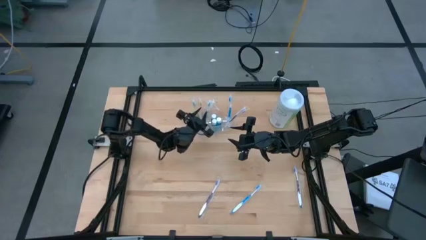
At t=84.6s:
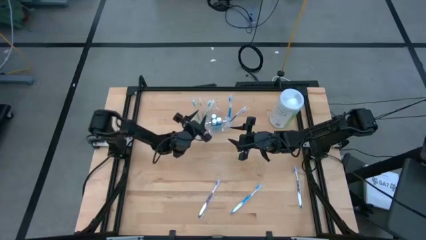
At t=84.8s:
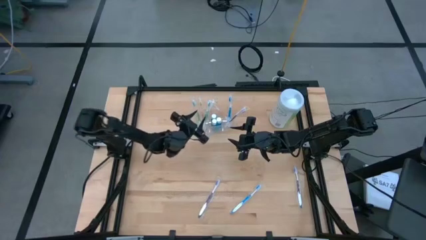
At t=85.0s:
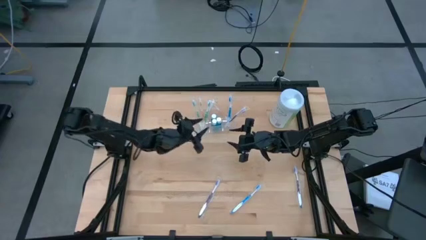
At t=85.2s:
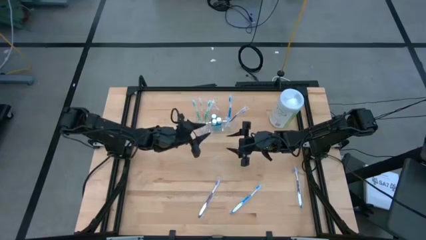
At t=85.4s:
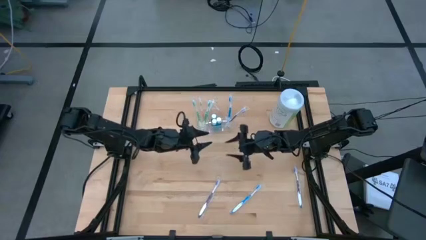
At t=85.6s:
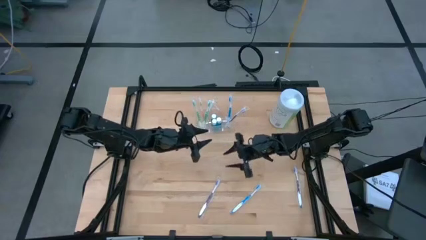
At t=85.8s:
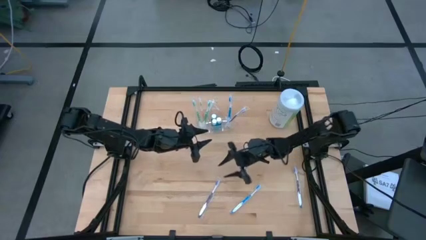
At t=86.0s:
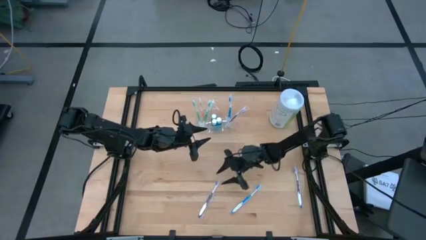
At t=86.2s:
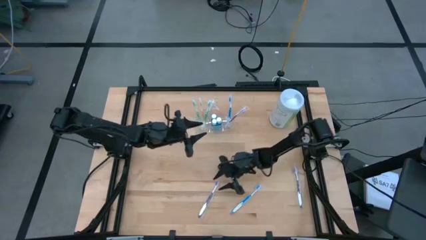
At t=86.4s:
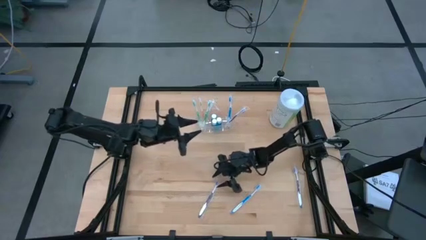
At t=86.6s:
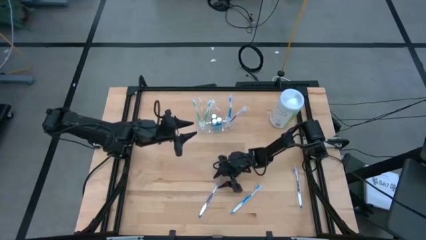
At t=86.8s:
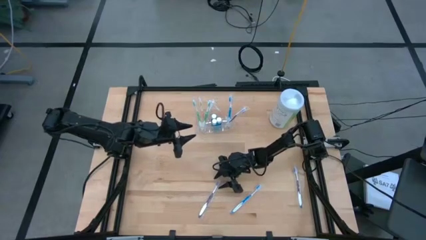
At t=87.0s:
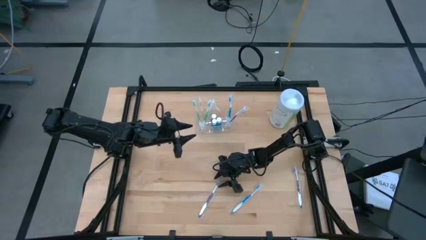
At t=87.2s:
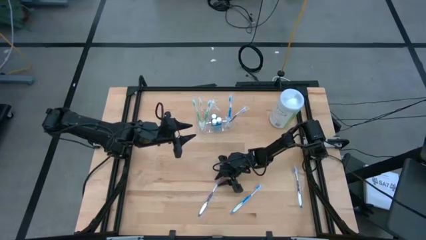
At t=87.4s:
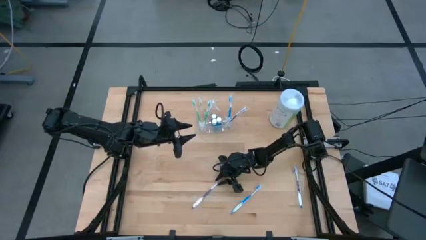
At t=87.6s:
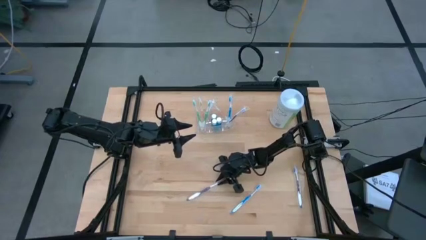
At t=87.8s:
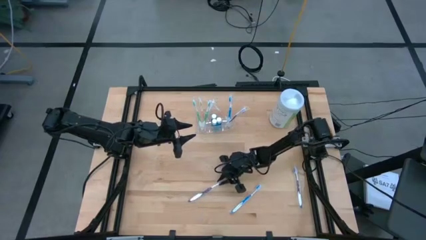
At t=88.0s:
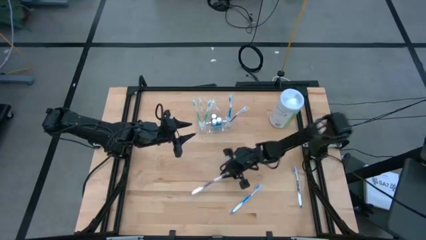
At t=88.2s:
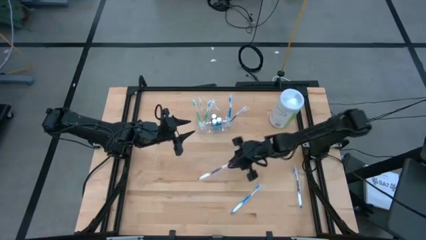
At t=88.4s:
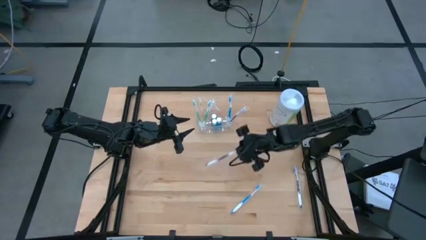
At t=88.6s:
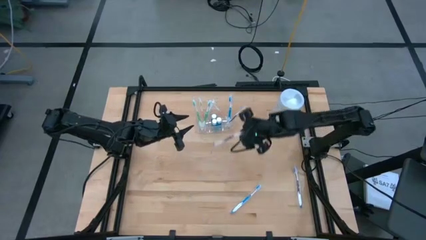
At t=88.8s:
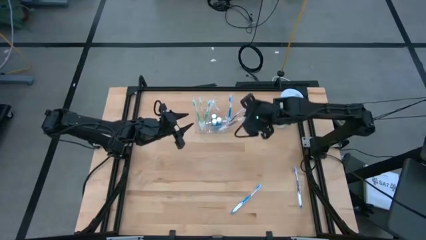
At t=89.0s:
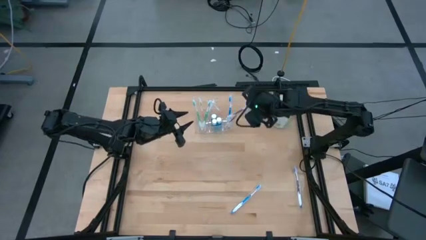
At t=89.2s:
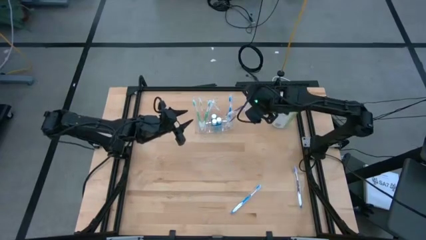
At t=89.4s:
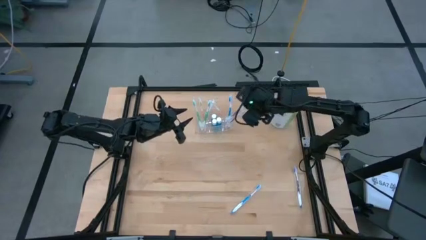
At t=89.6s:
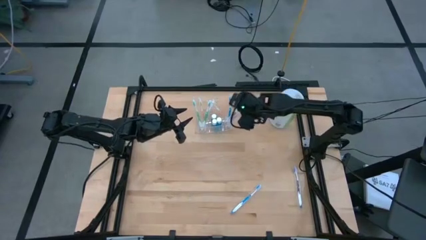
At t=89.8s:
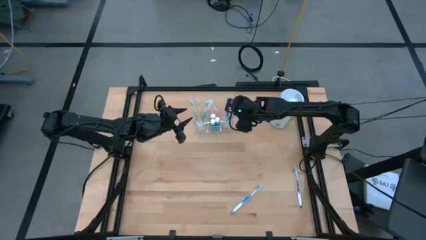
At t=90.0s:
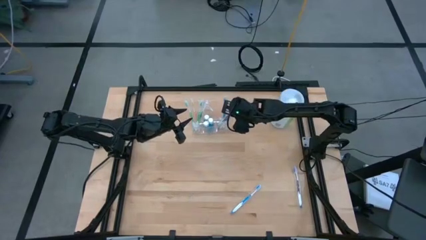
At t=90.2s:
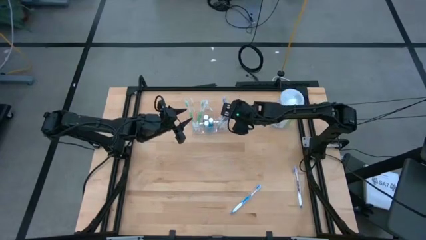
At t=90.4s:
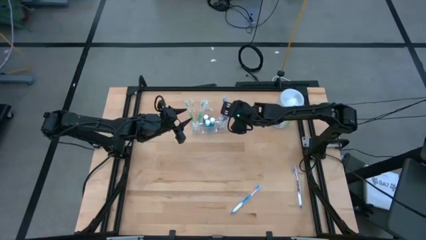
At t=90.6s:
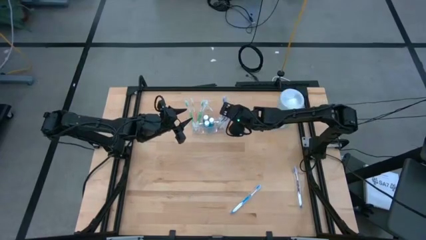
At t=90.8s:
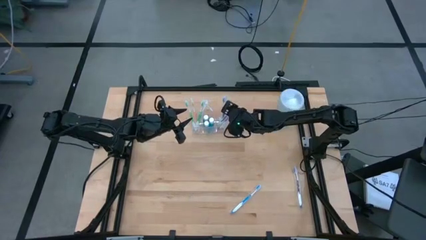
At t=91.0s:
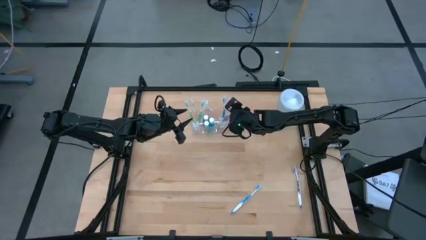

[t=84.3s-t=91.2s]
Task: Pick & Place toothbrushing station
Put the left violet toothbrush into the transparent organizer

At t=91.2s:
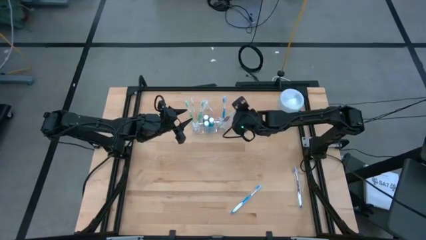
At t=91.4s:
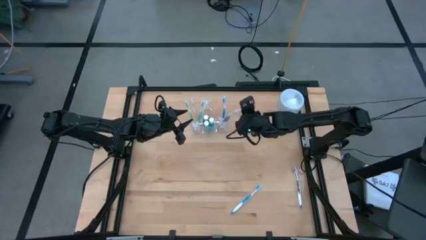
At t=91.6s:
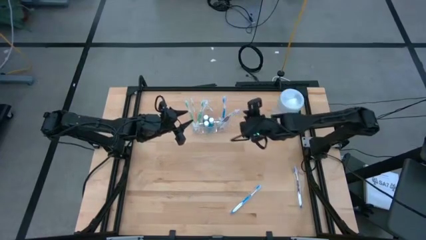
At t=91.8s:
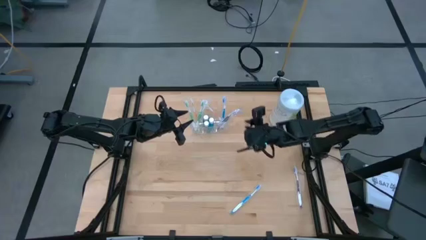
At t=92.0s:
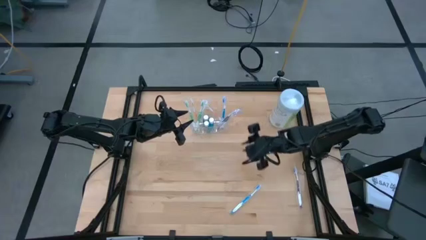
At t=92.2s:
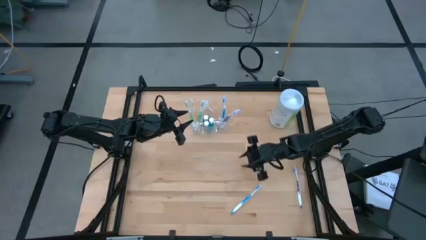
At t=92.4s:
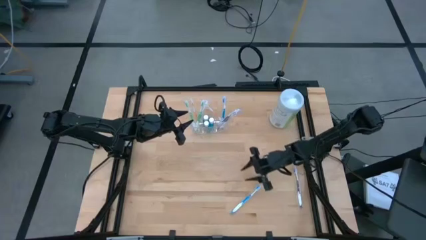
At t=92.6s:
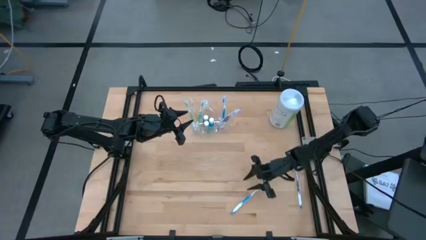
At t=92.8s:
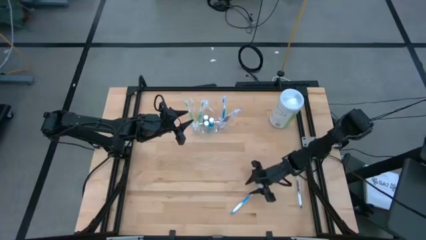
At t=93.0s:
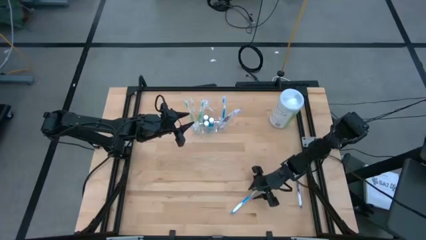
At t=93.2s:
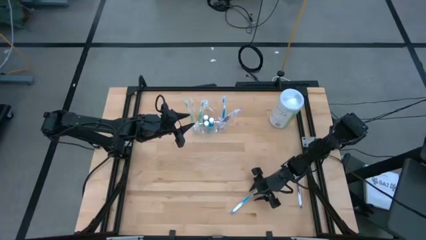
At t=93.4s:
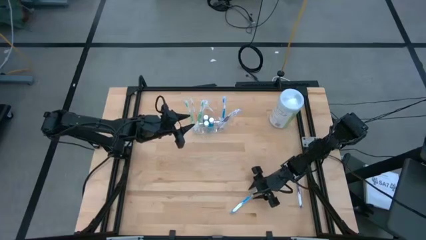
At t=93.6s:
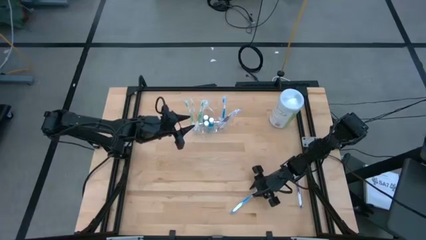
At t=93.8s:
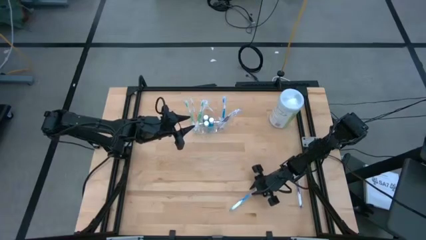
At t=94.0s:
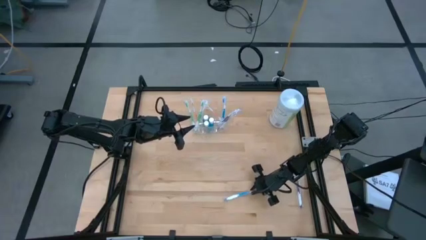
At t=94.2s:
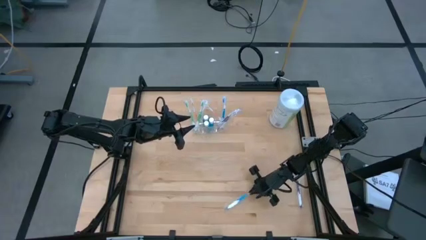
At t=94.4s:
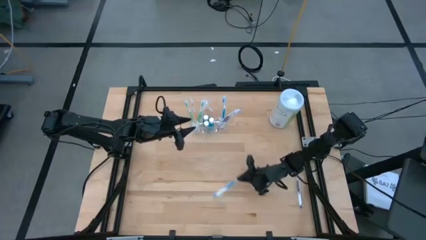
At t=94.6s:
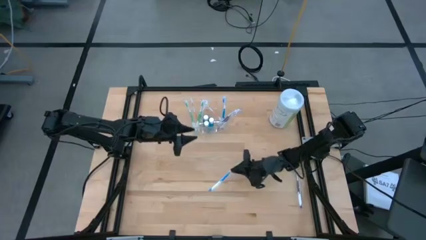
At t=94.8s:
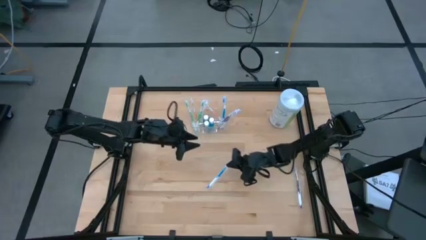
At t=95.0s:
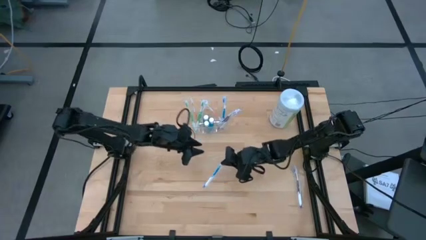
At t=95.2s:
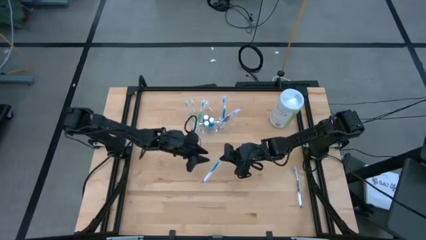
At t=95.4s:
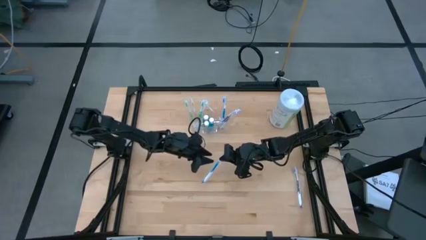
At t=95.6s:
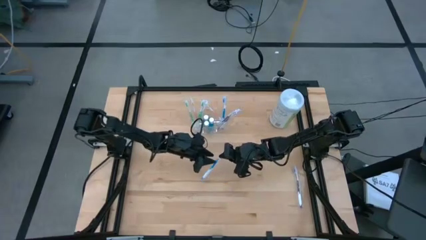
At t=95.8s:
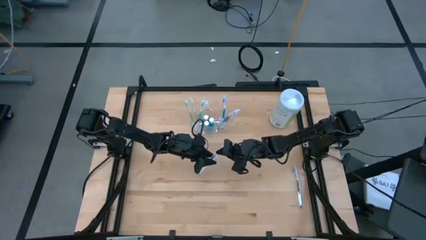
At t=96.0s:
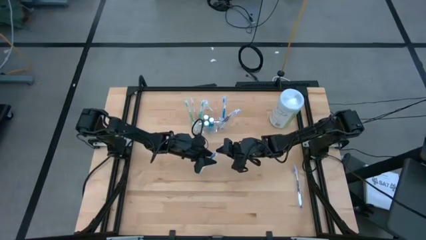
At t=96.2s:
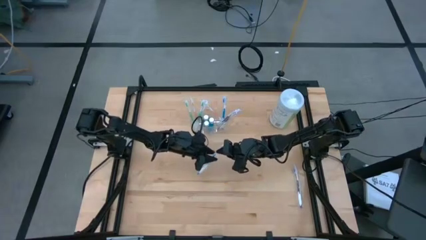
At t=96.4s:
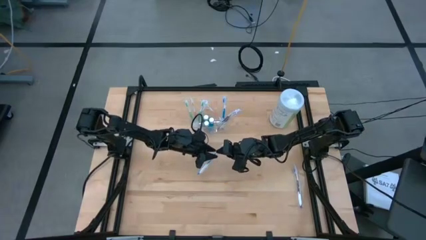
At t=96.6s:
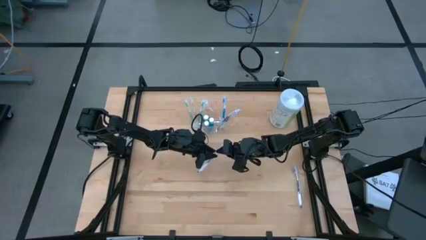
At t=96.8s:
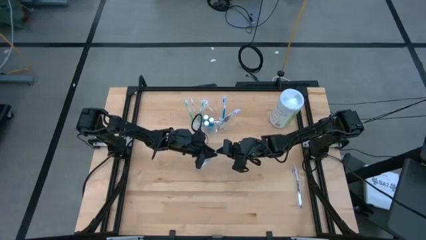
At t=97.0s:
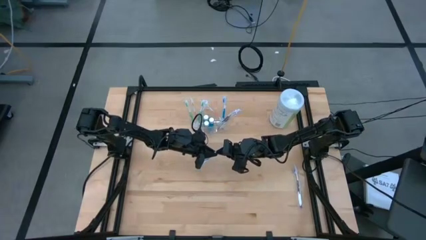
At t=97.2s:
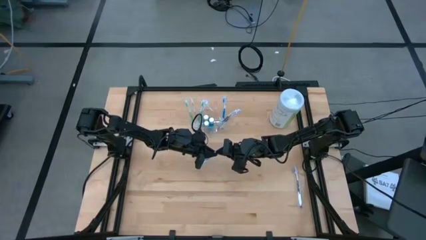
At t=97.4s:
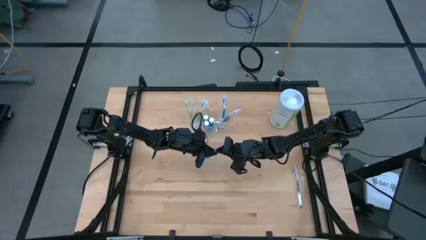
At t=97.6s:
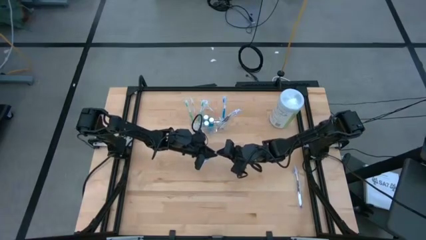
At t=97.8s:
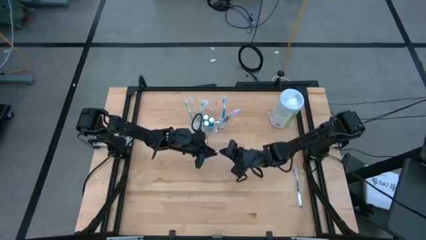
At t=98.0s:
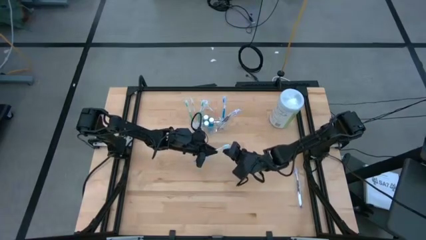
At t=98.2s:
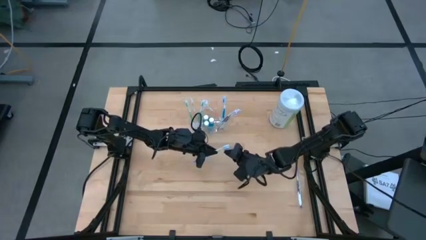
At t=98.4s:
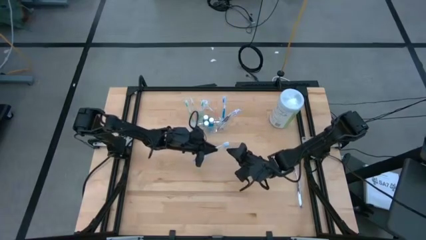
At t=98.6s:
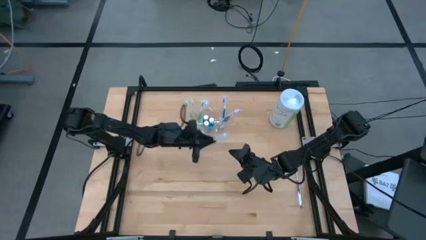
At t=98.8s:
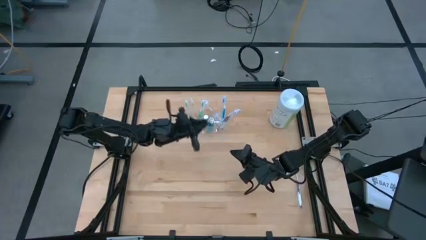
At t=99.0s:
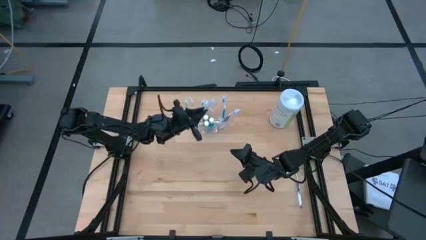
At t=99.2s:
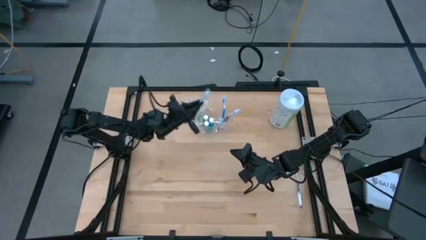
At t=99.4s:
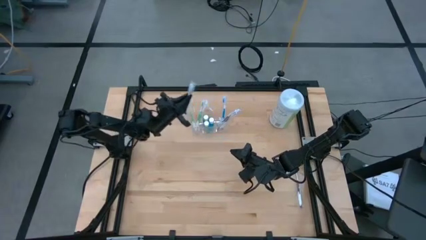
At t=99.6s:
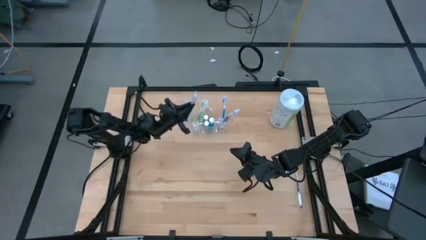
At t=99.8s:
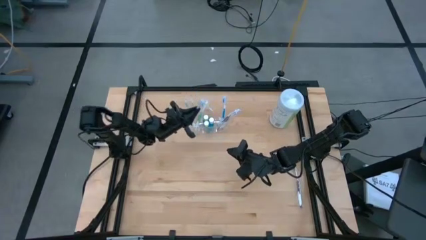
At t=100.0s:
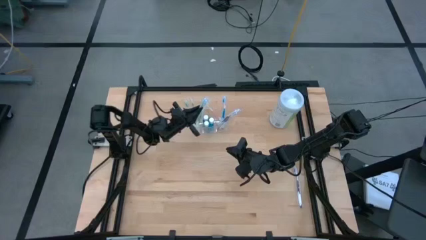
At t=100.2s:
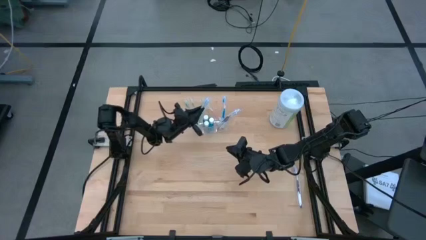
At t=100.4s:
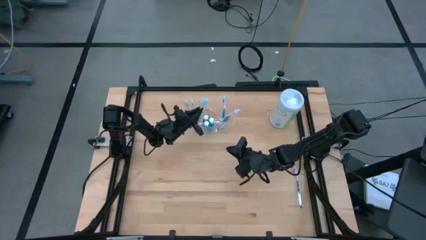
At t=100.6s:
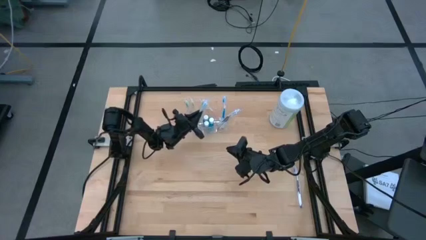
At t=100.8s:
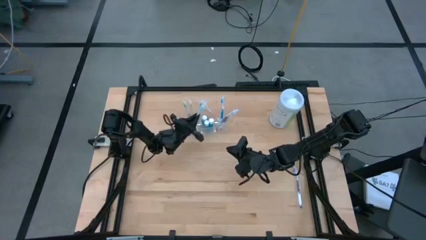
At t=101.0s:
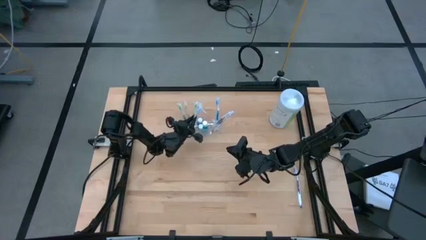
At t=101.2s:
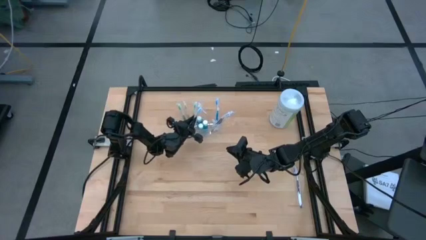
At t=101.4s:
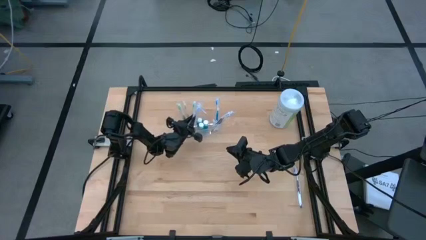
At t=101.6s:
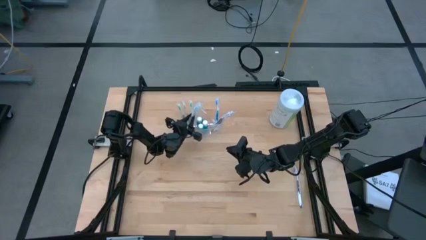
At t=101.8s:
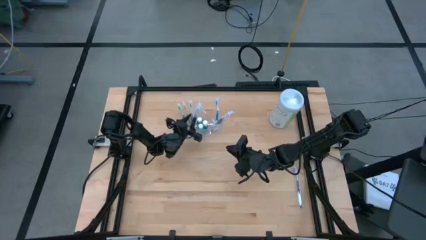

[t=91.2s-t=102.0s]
Put the blue toothbrush into the transparent organizer
